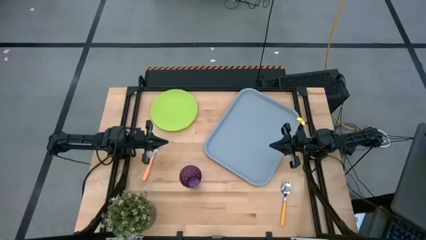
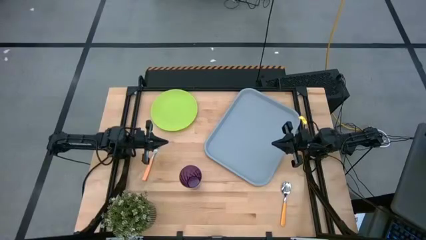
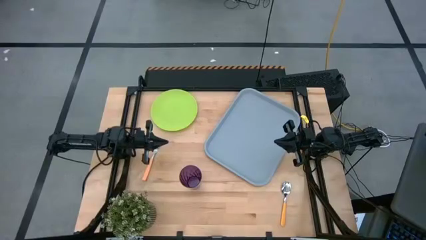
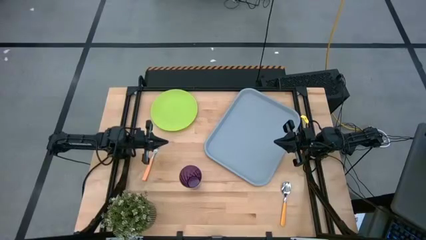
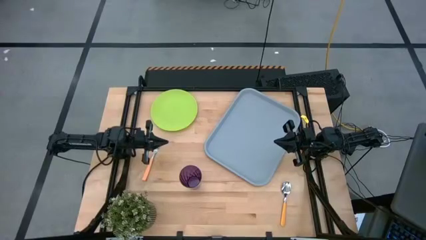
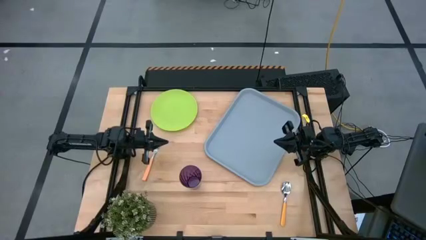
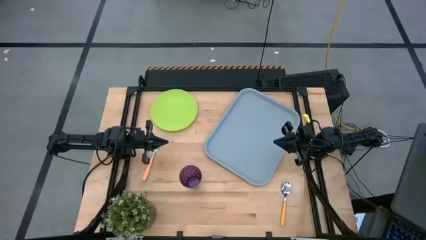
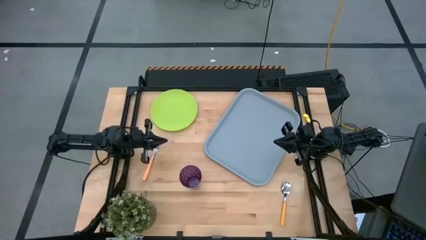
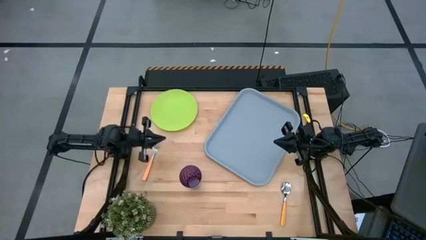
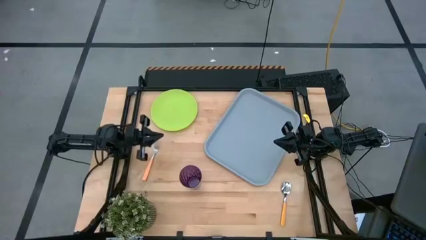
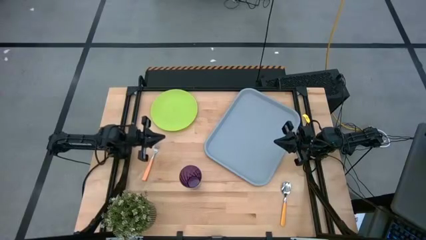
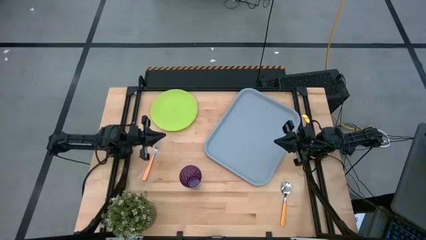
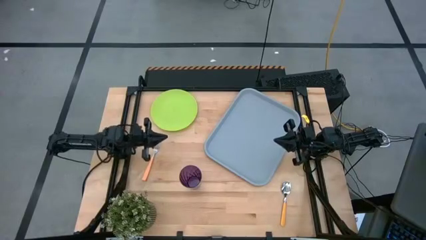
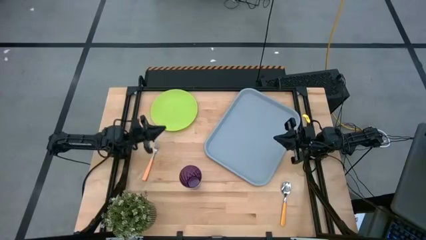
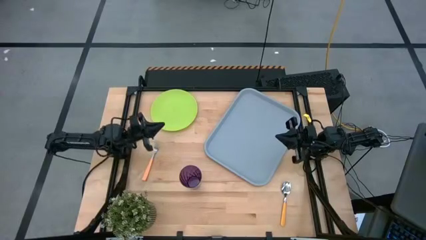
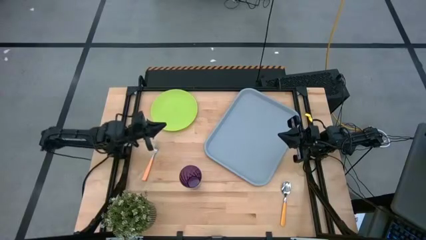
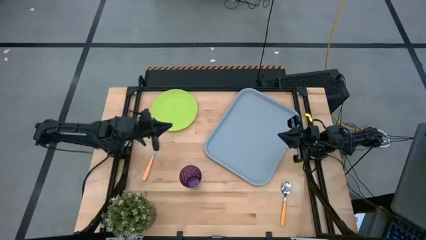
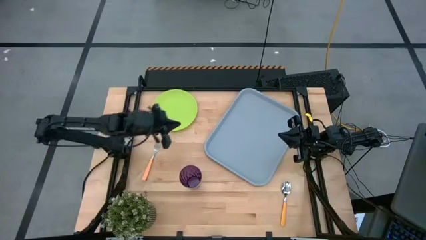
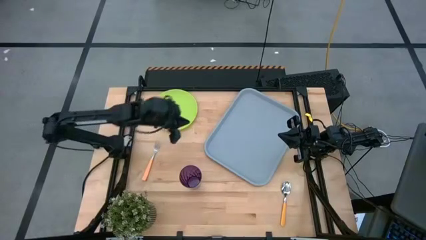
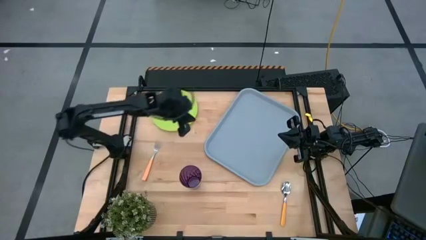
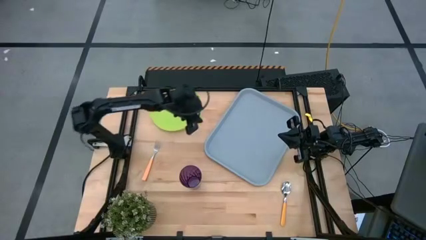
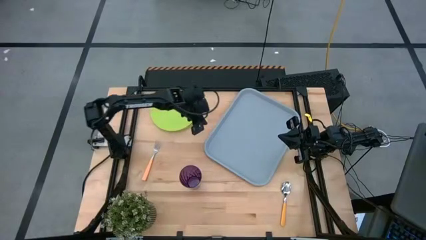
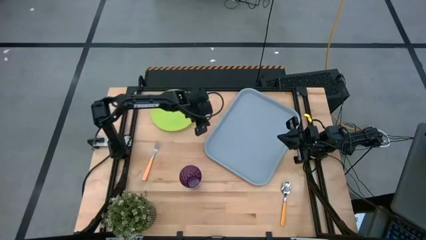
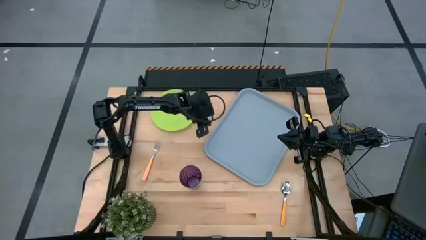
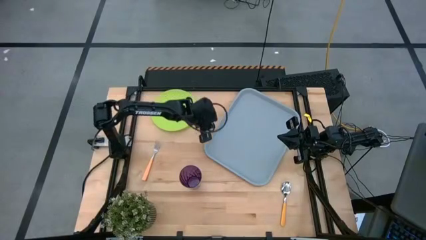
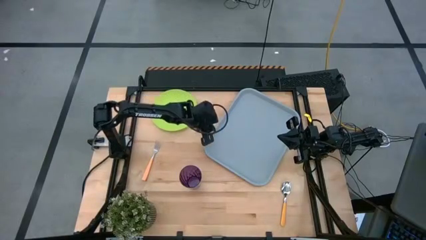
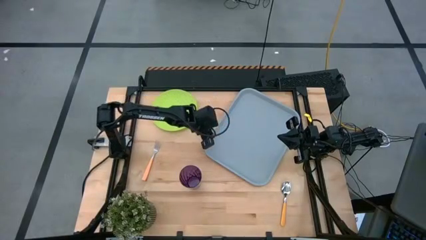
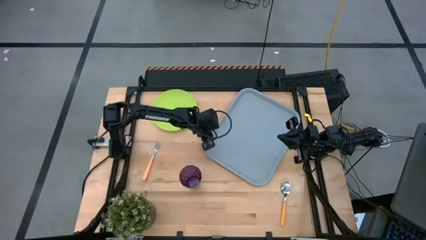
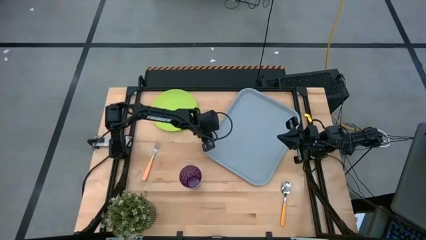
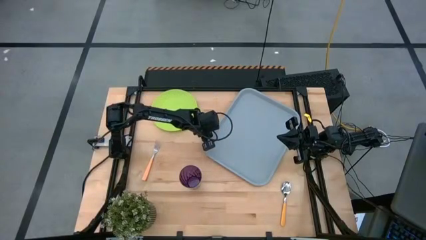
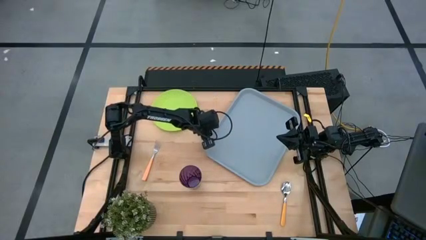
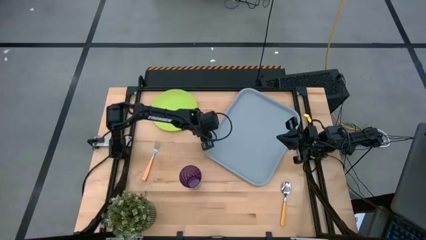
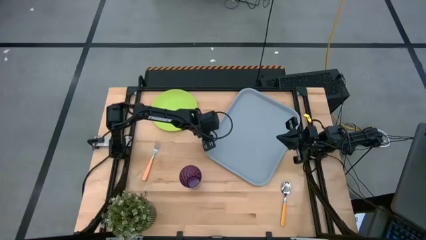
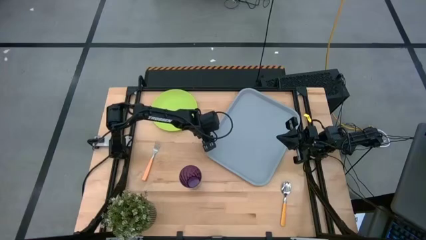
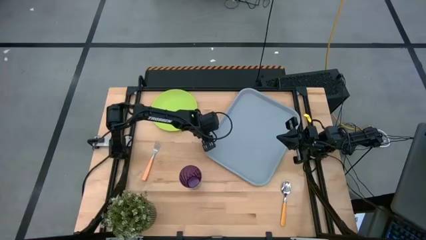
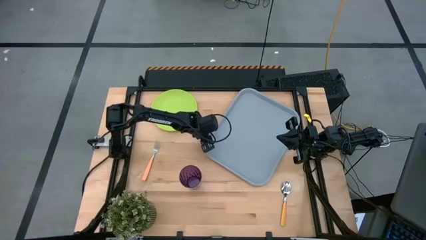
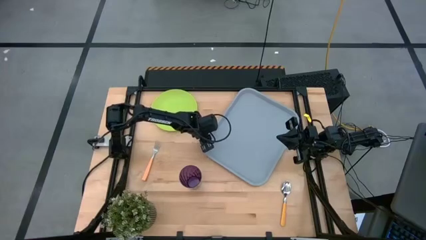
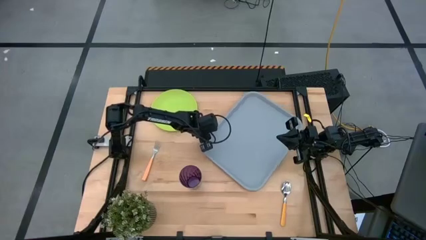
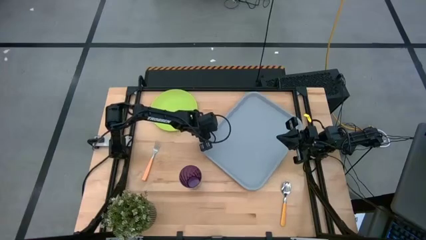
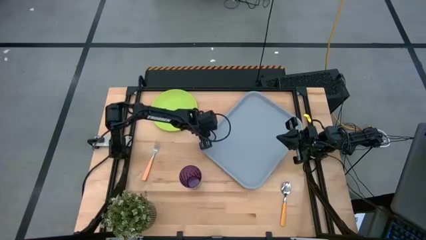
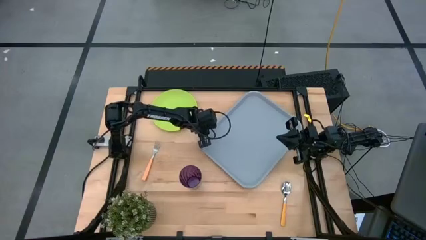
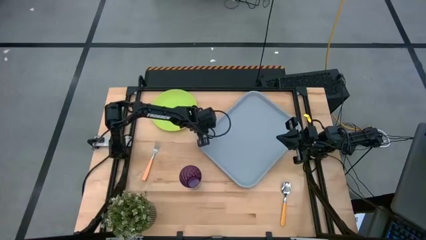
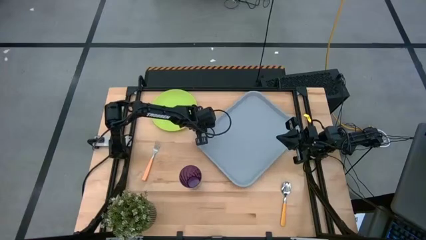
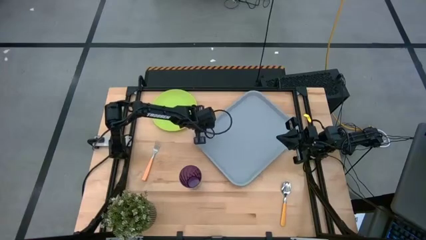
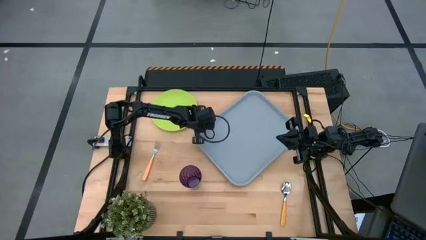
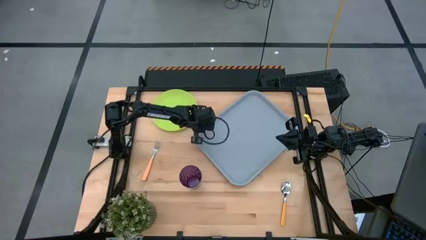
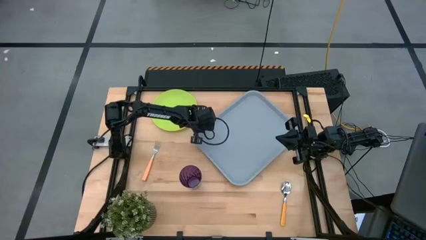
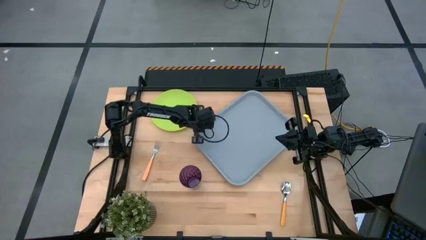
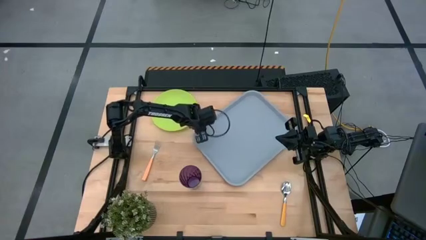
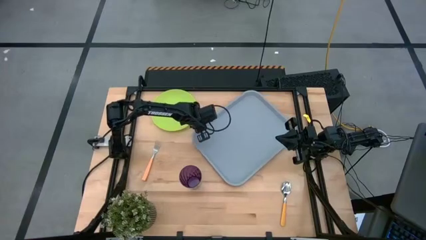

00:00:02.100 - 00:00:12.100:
Task: Pick and place plate/cup/fork/spoon on tray
Prepare the gray serving tray

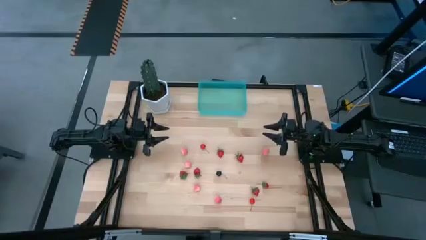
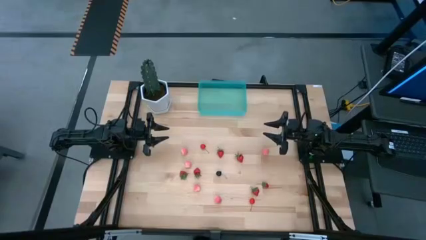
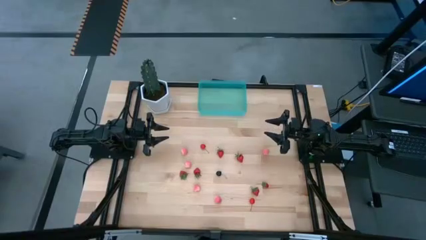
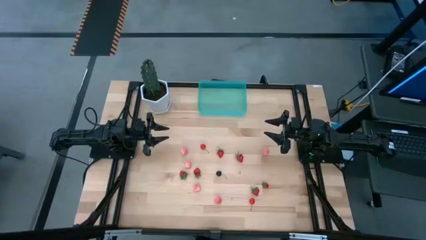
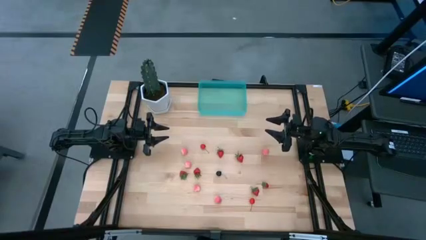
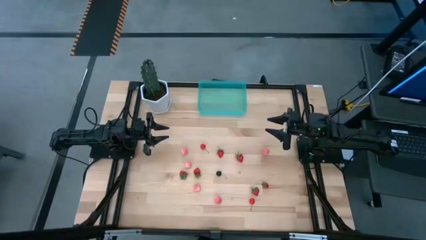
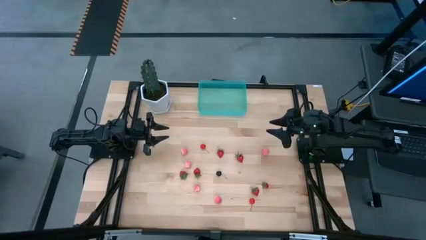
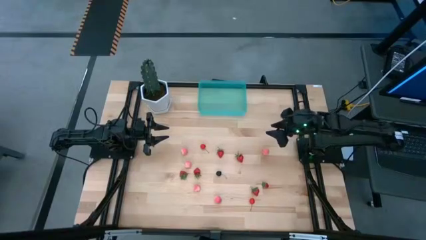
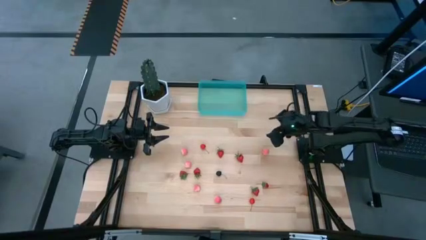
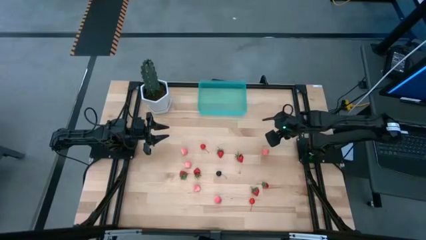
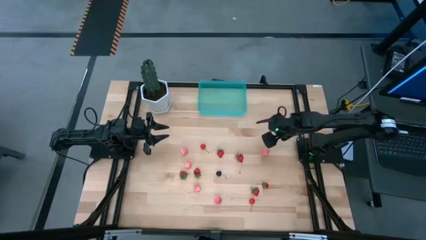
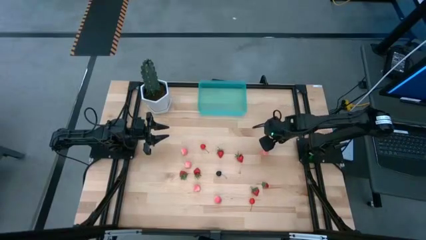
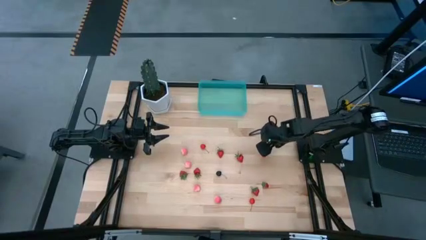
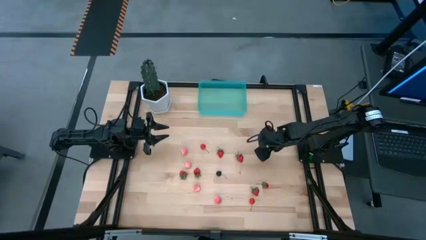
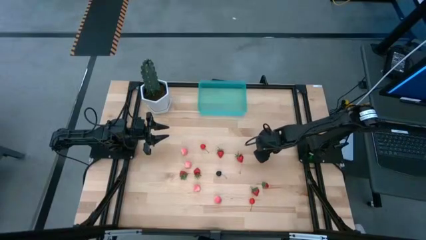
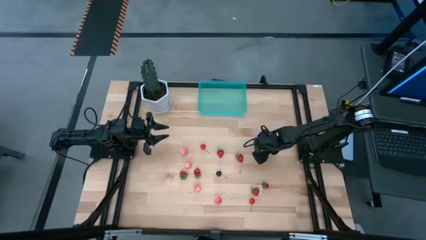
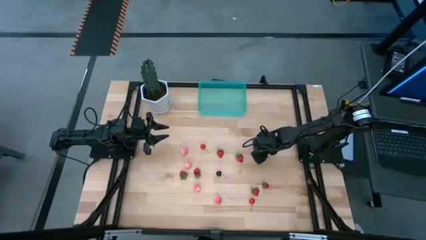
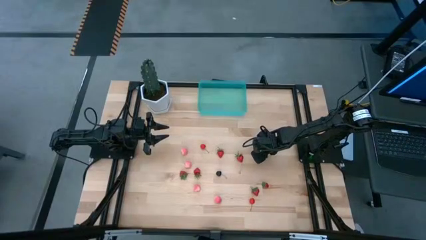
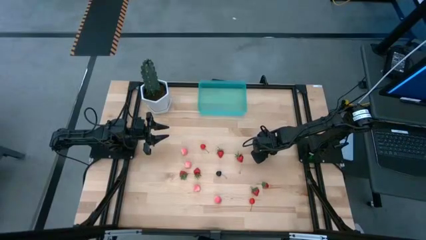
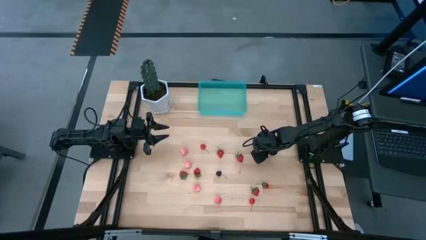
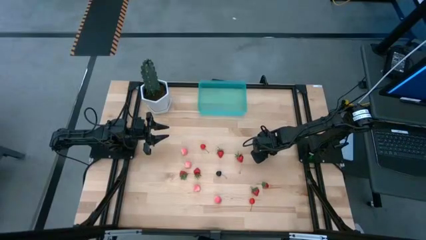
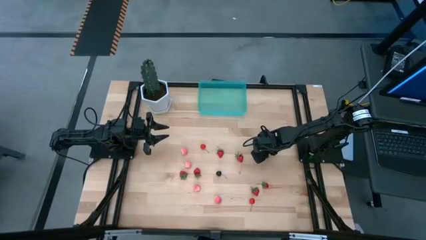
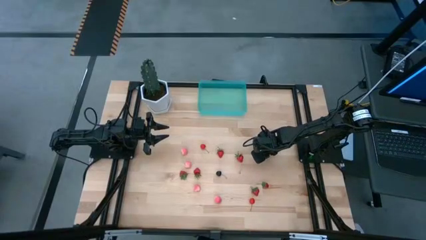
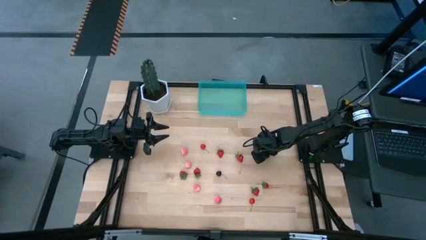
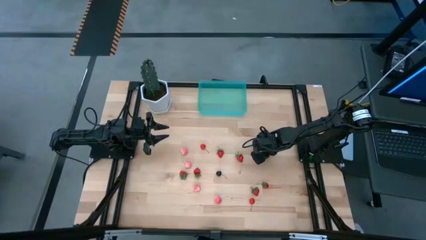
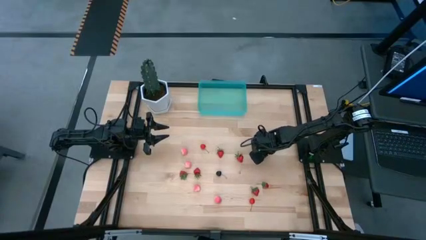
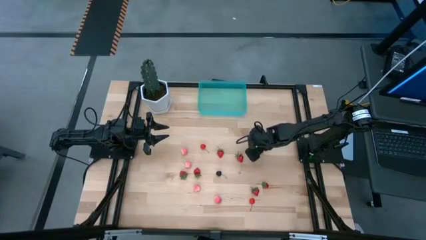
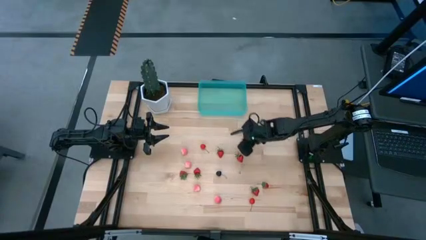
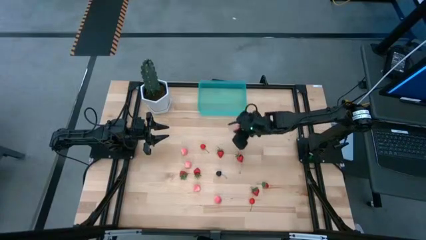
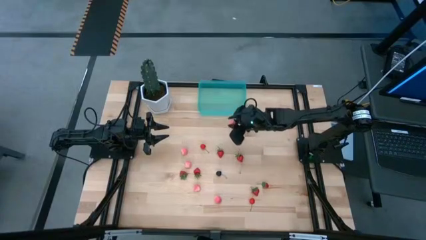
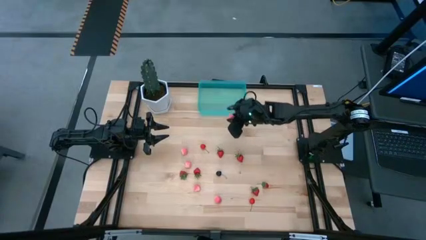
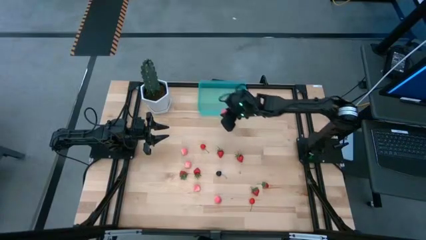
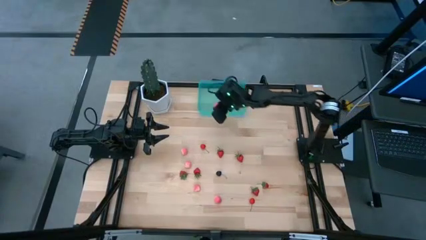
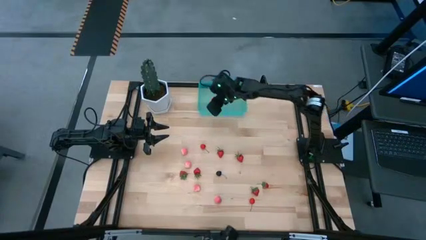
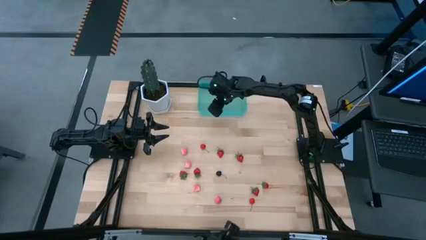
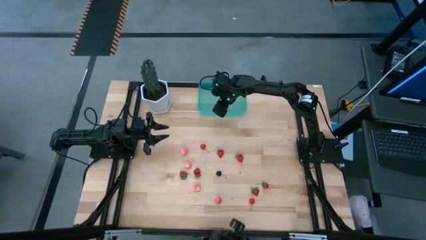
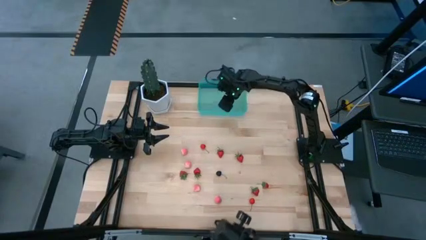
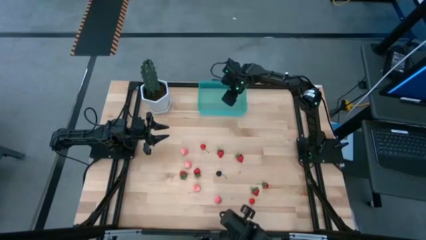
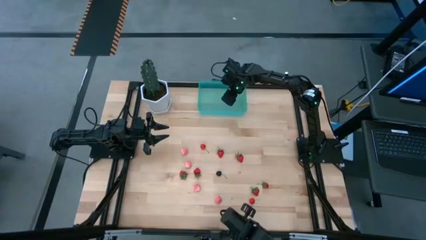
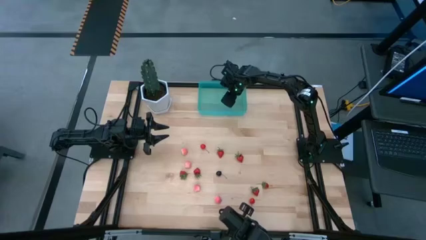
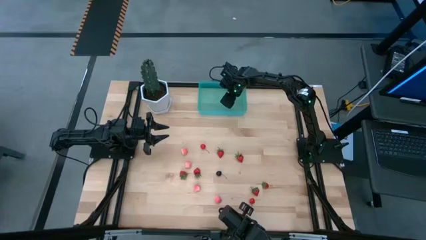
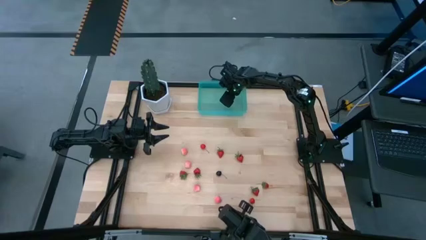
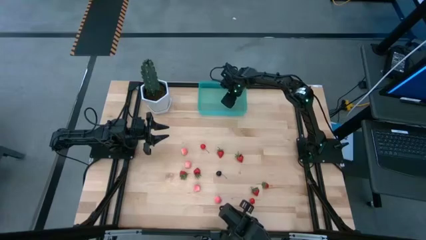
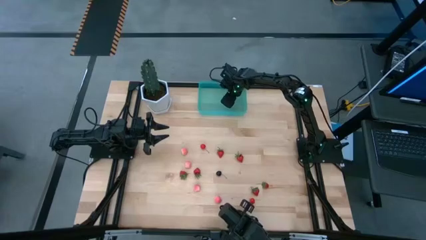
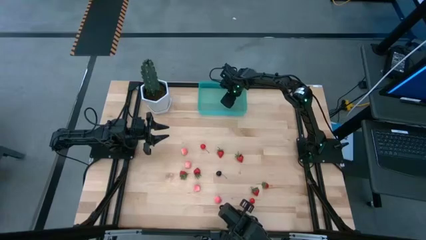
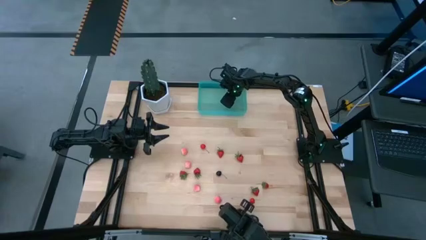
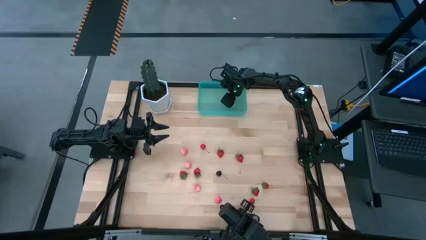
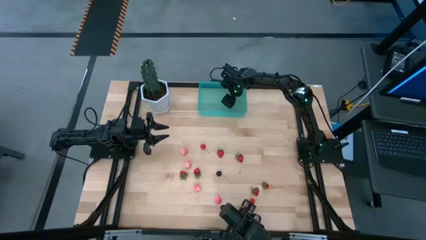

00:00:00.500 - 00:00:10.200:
Task: Pick and placing Produce into tupperware
Put the peach into the container
